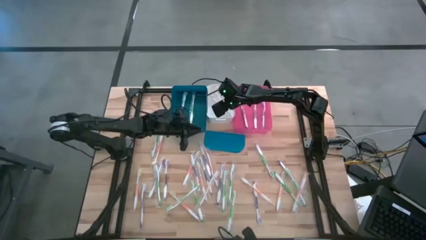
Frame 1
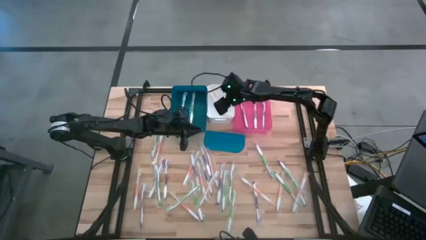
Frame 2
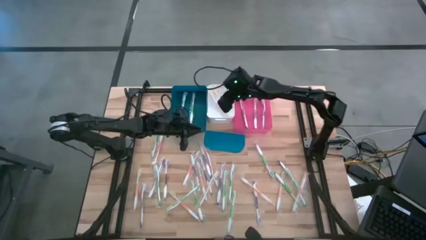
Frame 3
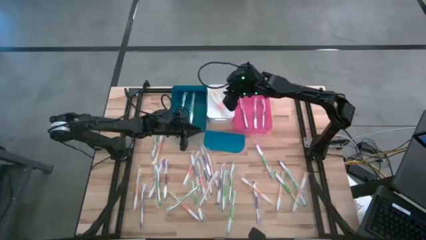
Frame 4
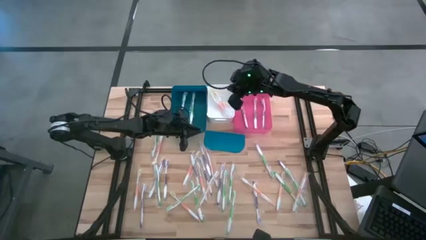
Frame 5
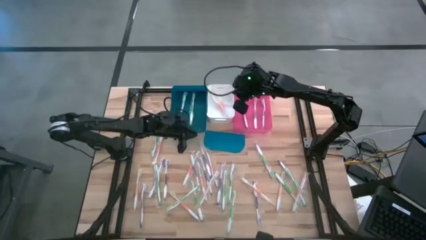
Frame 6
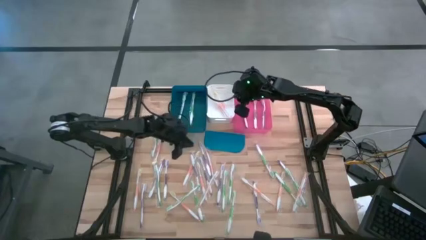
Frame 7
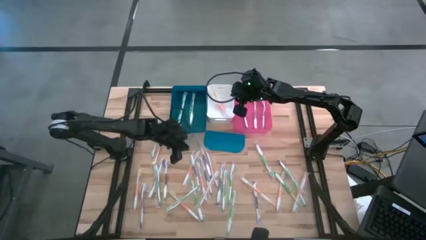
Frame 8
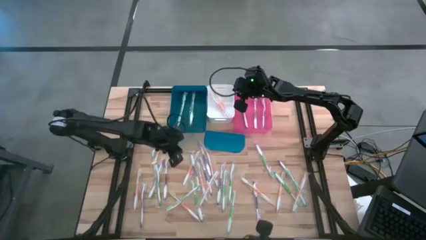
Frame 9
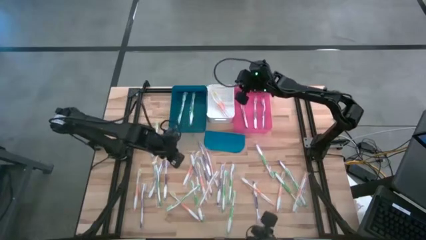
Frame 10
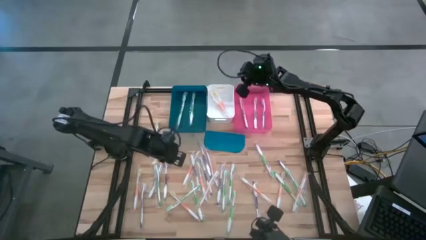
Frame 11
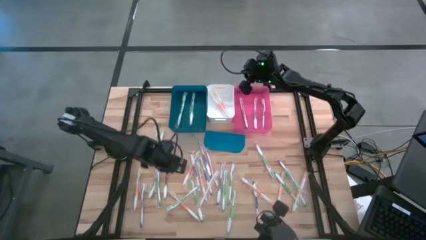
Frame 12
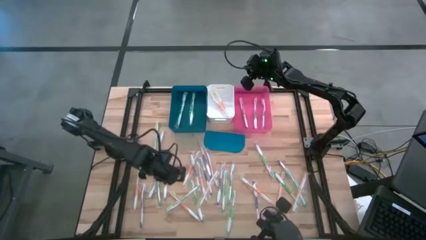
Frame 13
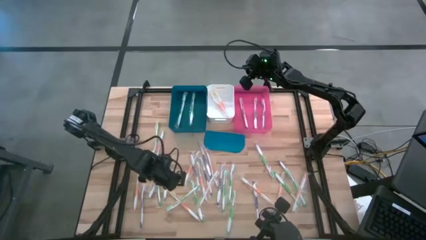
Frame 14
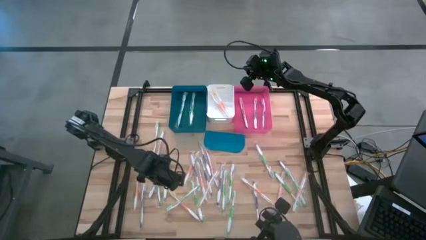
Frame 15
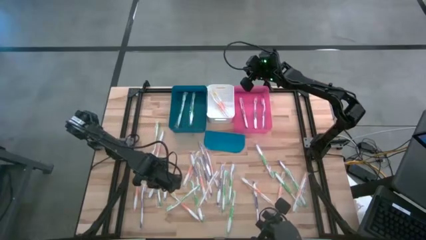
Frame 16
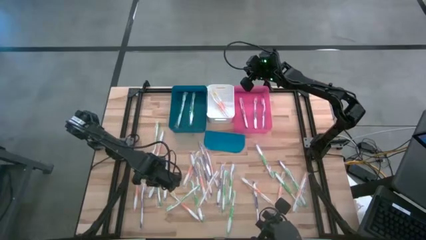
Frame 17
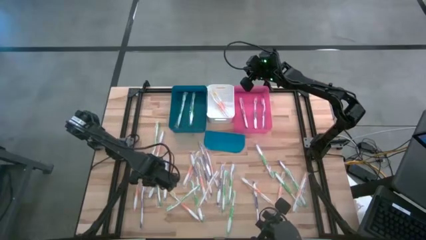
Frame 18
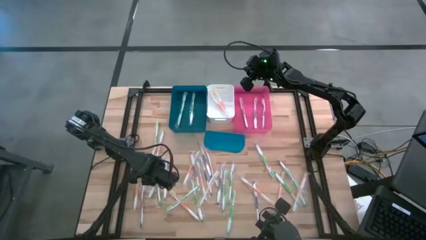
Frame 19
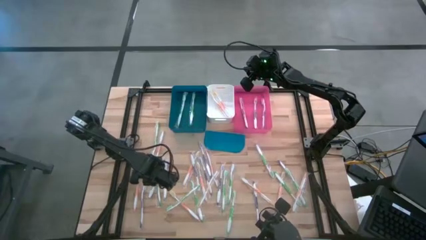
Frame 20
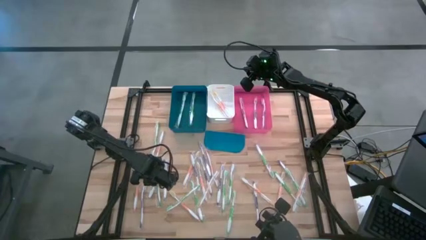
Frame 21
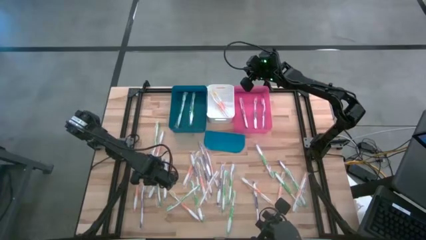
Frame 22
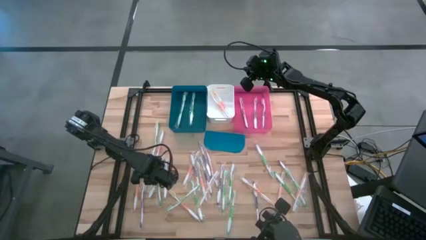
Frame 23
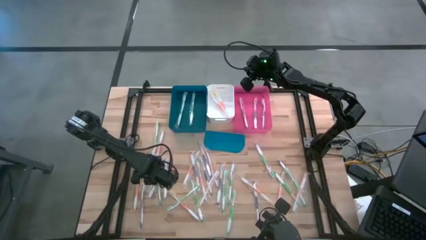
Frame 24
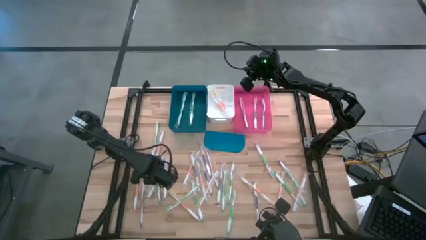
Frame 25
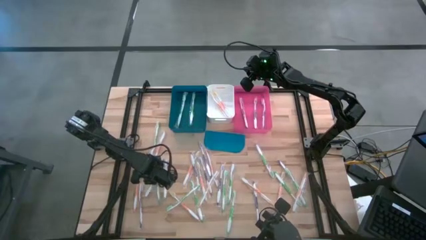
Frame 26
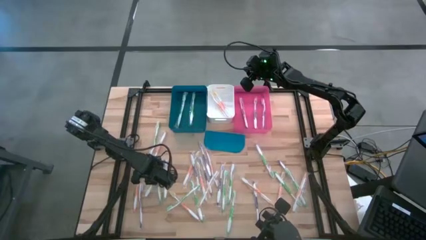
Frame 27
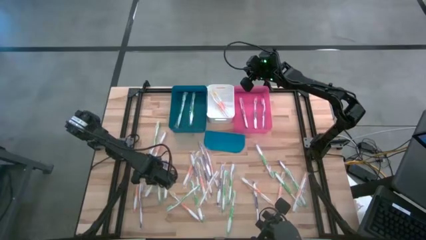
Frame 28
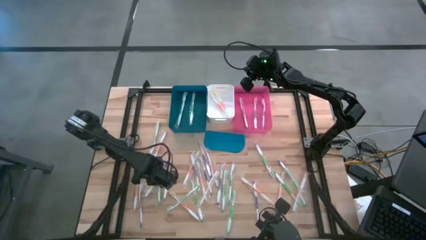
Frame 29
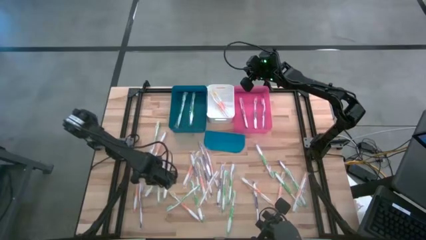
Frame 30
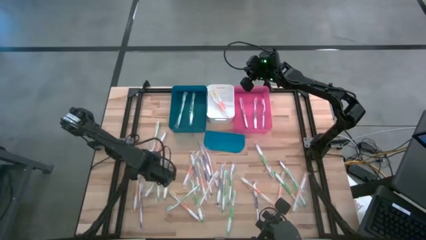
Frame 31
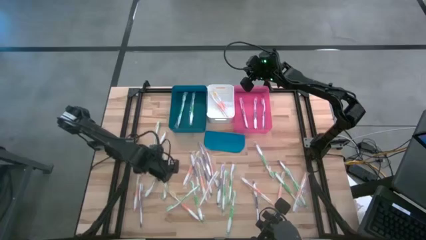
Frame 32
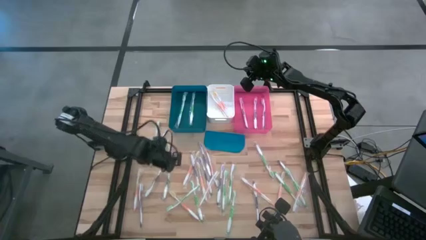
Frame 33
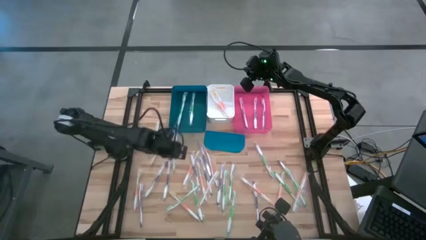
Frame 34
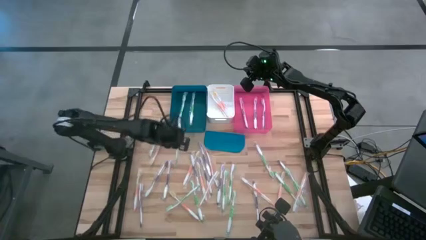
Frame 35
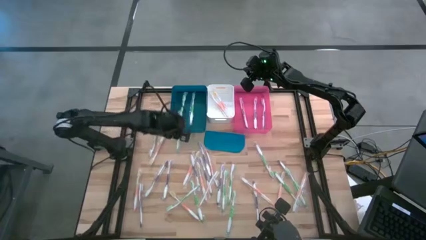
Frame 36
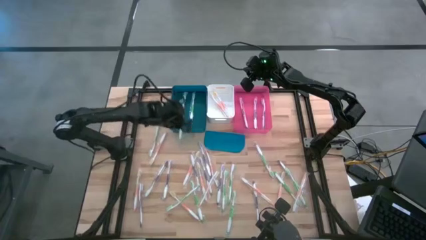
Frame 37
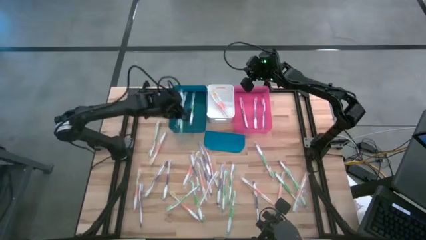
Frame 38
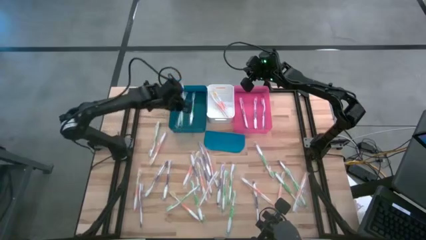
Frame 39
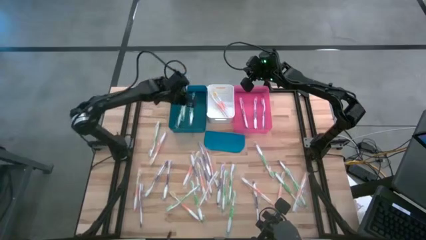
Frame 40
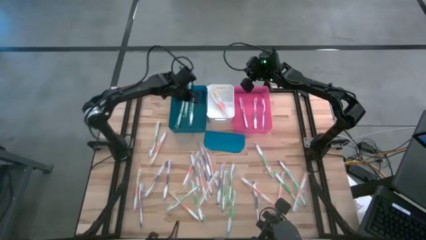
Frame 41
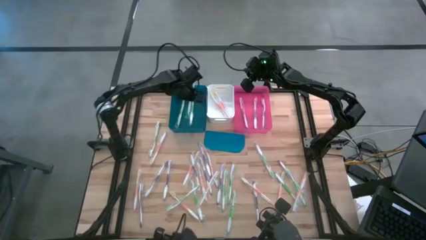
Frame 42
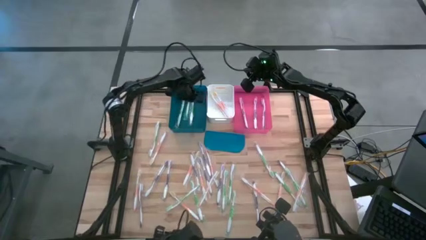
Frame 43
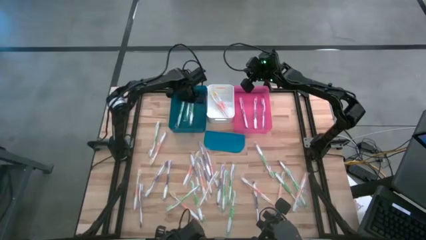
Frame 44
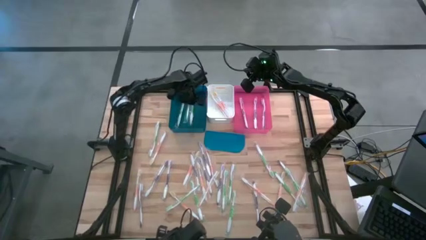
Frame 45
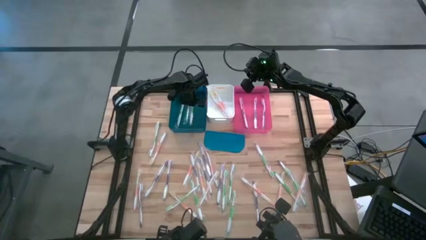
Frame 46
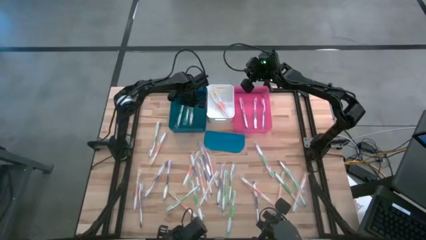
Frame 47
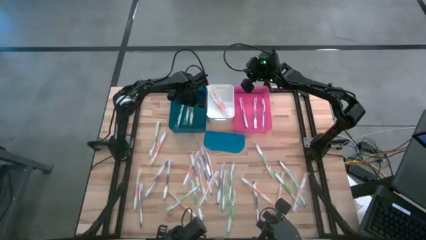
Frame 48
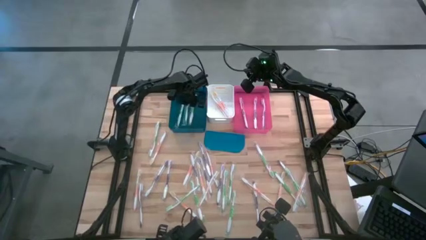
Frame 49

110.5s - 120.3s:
Task: Pick & Place Toothbrushes
Put the green toothbrush into the blue bin

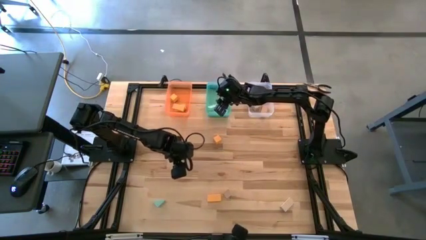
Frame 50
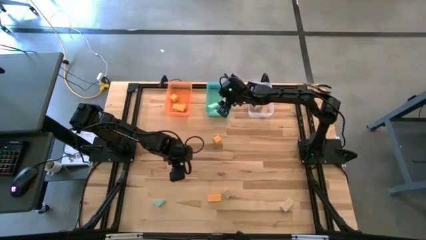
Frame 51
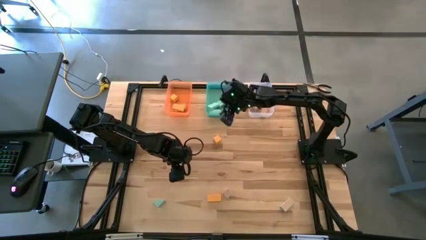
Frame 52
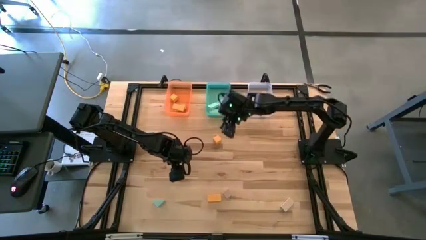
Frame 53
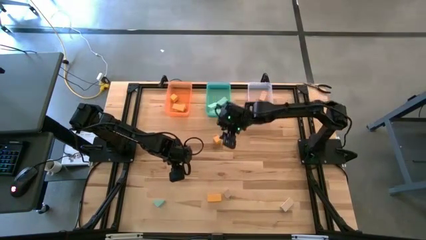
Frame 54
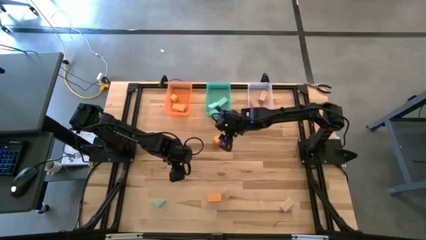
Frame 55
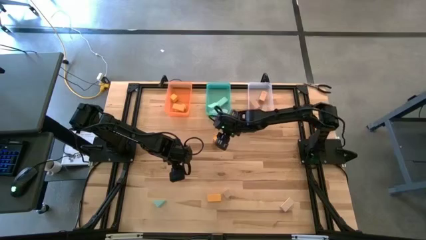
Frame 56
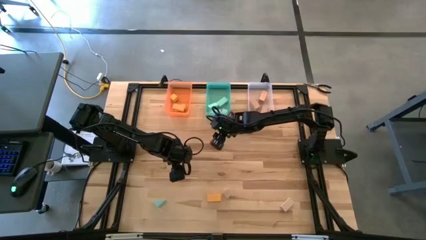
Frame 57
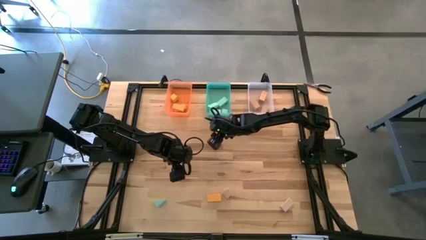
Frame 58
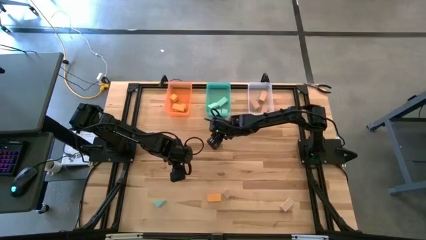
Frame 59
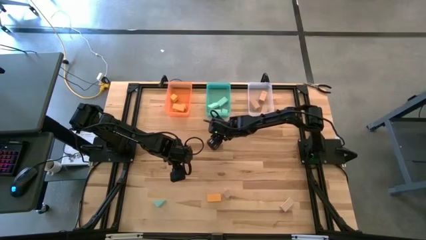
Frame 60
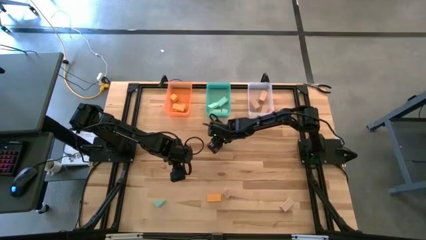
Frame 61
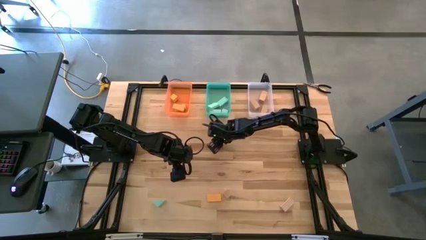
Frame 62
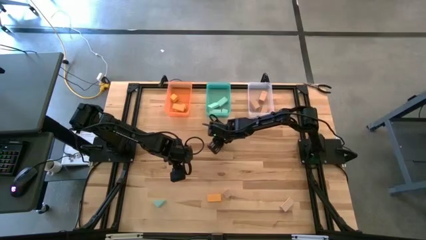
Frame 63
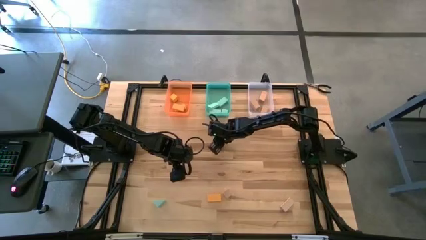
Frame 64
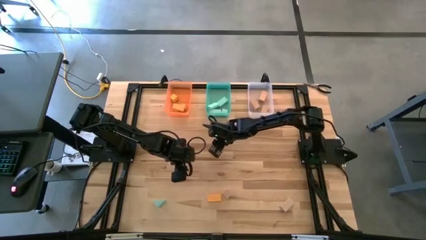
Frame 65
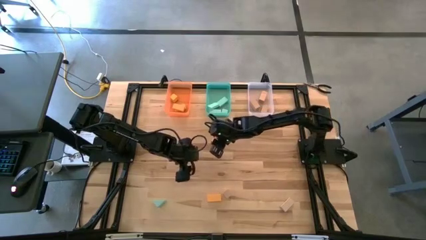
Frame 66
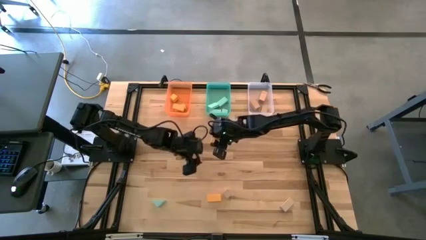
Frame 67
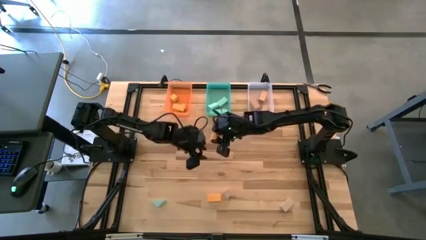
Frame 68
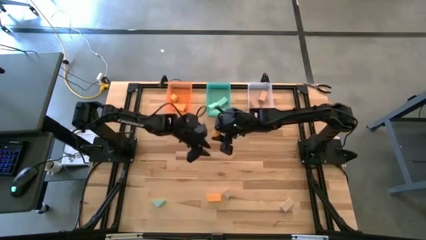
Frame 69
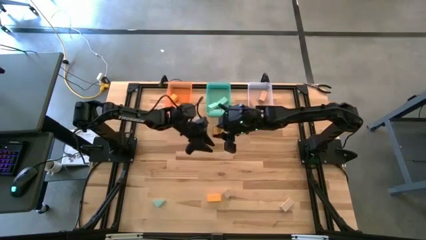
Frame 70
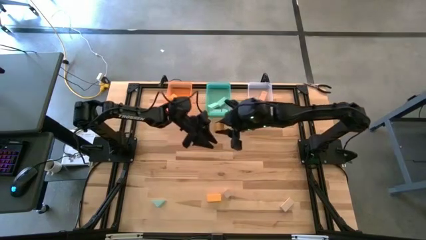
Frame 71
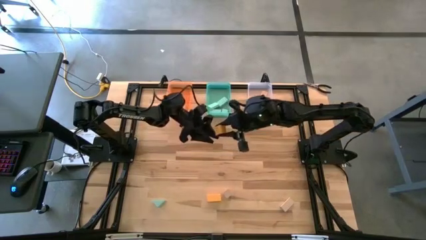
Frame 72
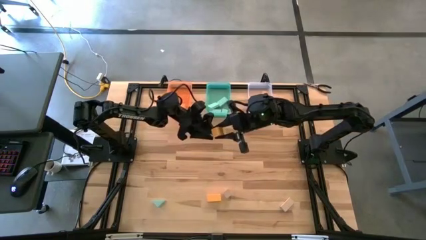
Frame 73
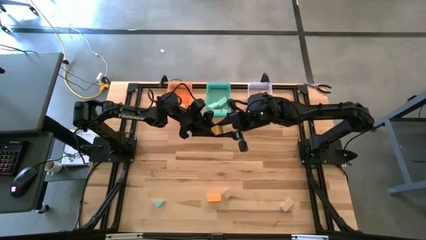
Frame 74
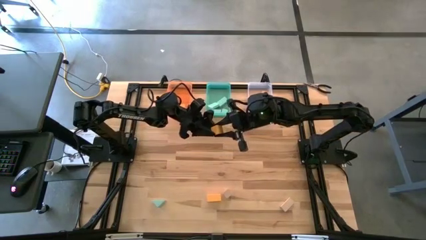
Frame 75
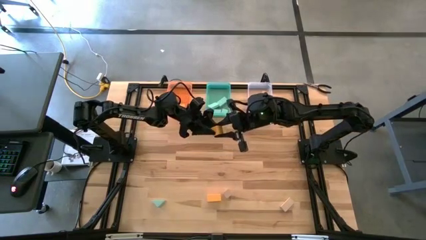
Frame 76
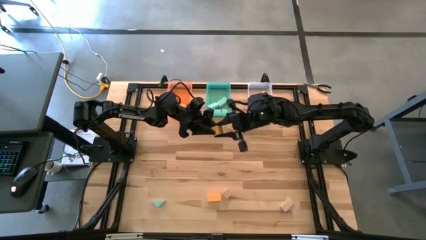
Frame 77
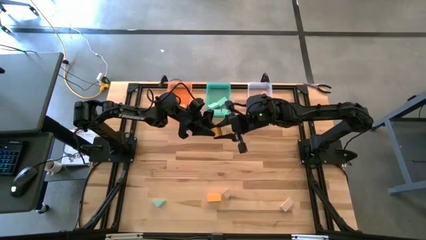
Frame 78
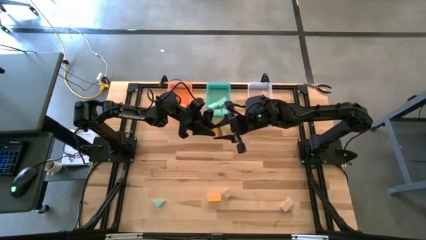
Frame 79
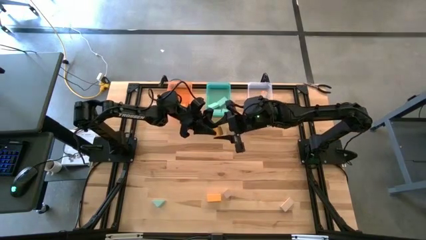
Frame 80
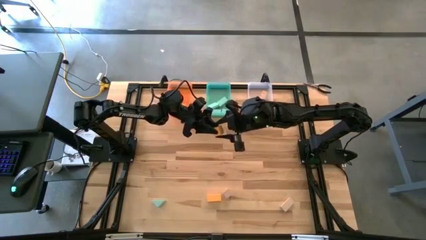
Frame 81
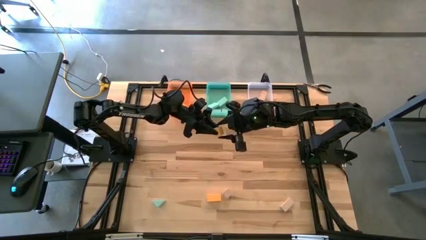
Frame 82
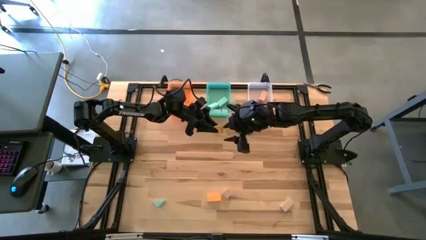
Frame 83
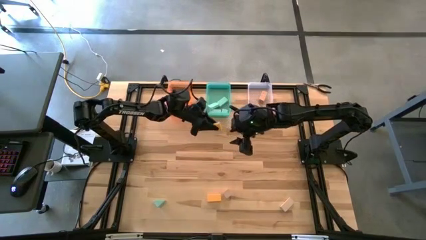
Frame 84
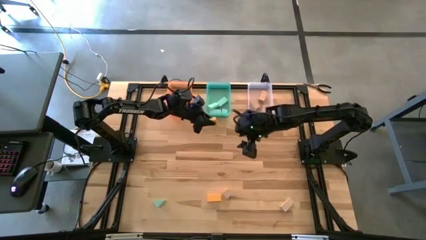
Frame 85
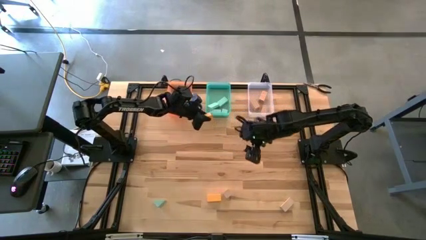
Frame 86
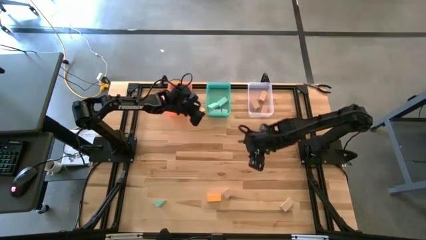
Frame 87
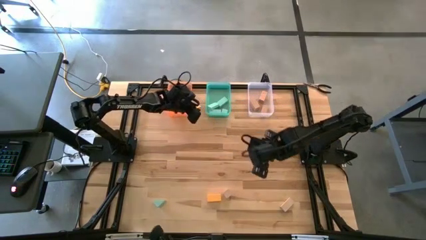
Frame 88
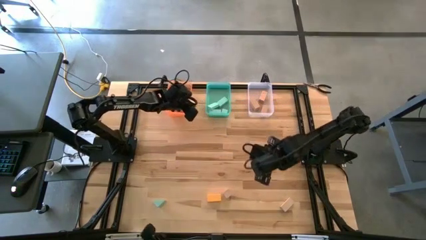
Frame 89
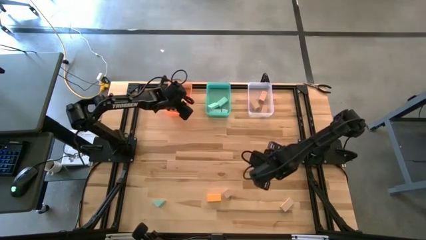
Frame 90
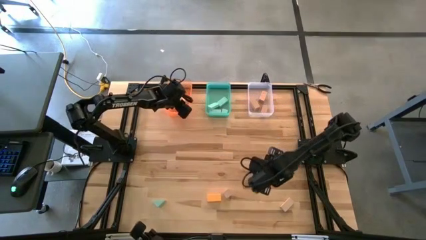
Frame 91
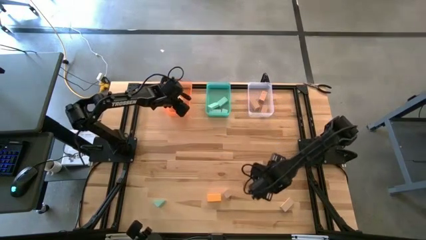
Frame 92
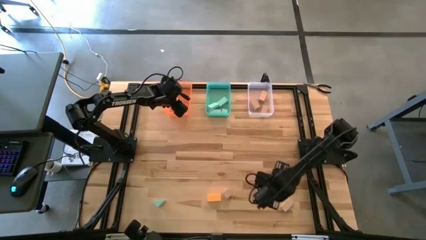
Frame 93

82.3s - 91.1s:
Task: Sort & place blocks by color
Put the orange block into the orange bin
